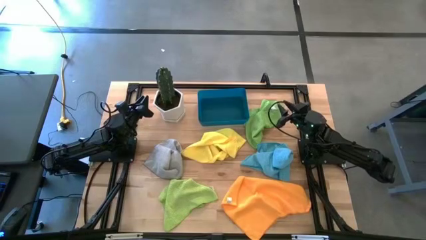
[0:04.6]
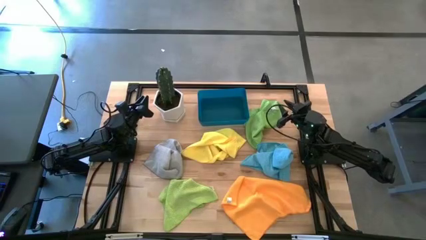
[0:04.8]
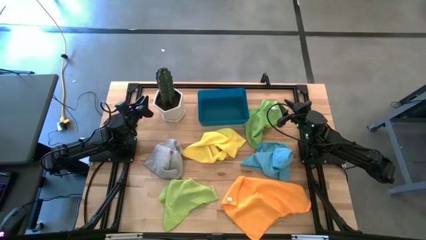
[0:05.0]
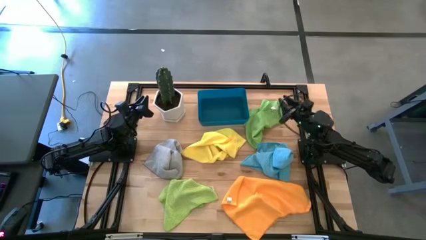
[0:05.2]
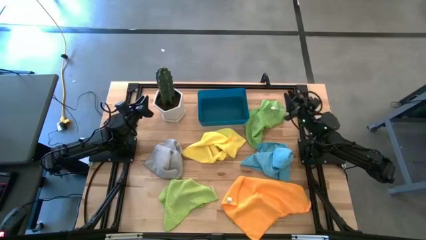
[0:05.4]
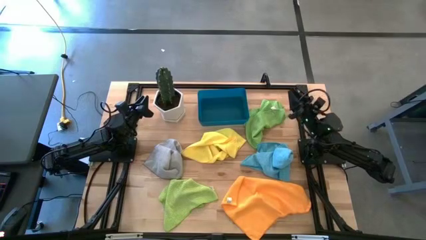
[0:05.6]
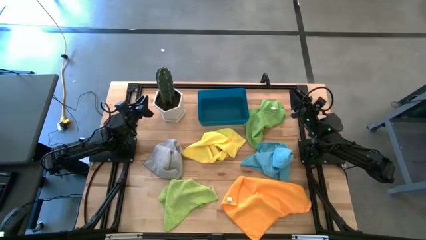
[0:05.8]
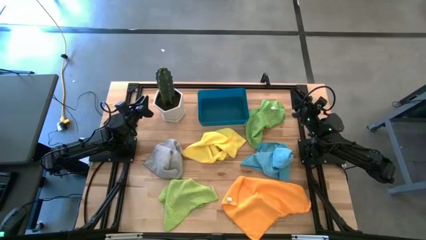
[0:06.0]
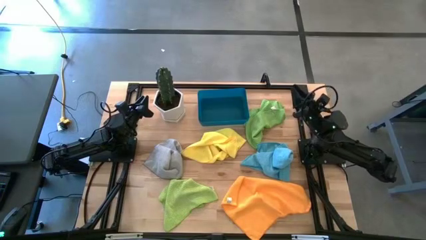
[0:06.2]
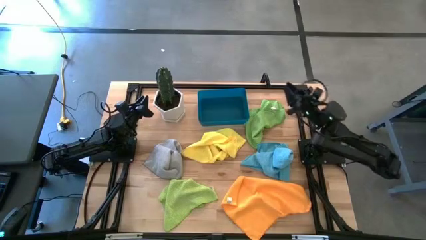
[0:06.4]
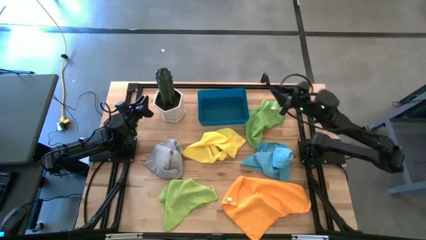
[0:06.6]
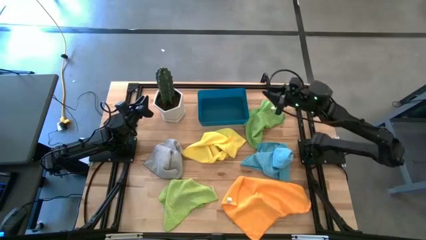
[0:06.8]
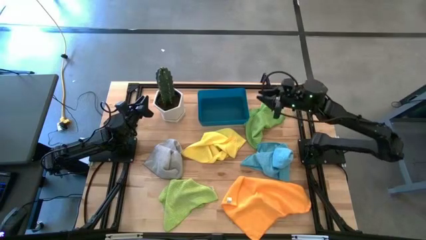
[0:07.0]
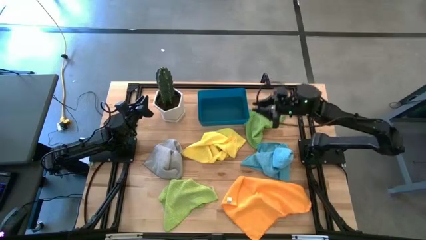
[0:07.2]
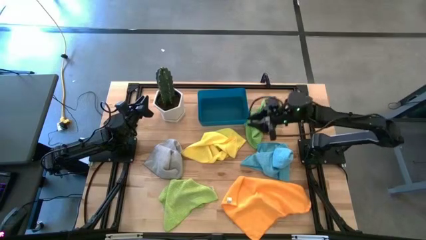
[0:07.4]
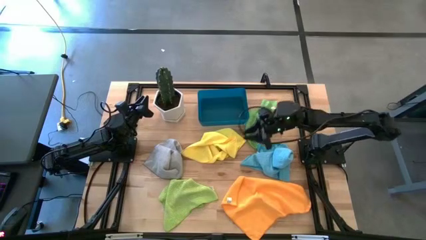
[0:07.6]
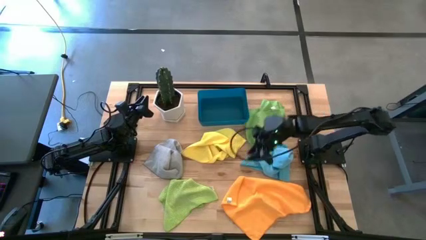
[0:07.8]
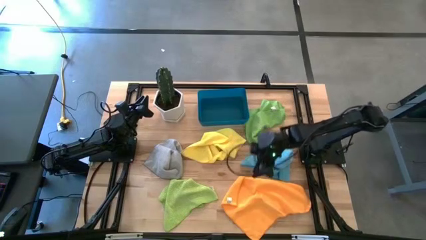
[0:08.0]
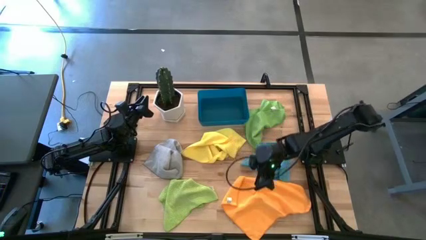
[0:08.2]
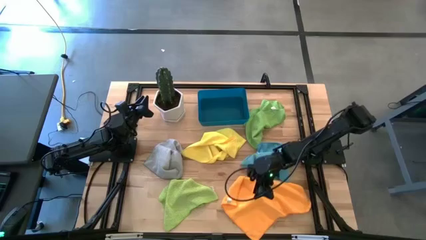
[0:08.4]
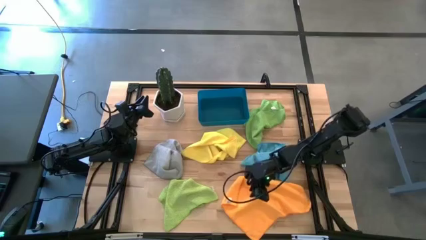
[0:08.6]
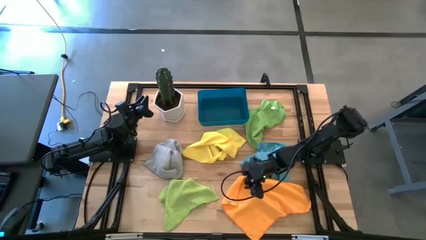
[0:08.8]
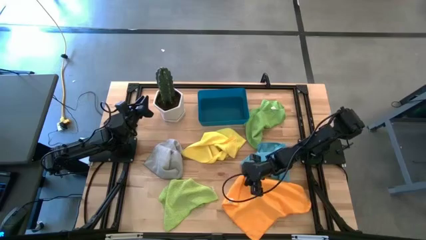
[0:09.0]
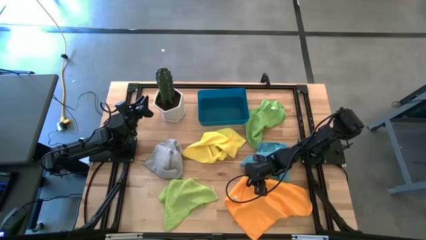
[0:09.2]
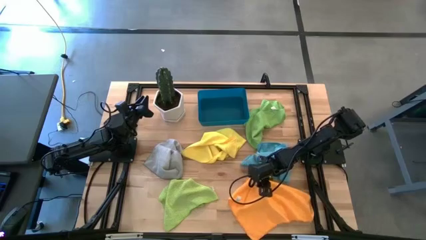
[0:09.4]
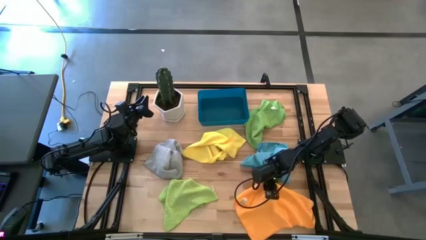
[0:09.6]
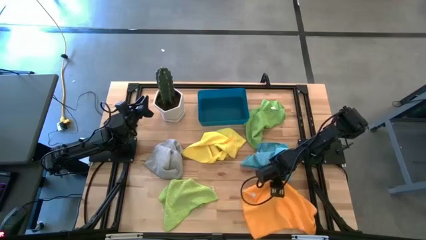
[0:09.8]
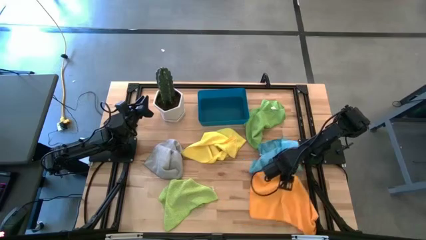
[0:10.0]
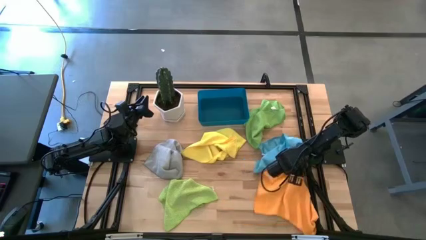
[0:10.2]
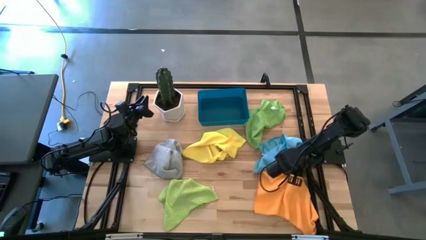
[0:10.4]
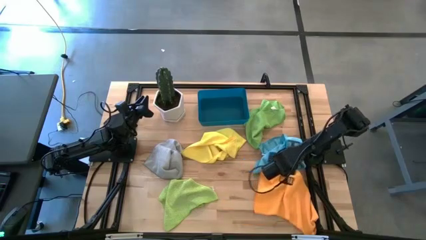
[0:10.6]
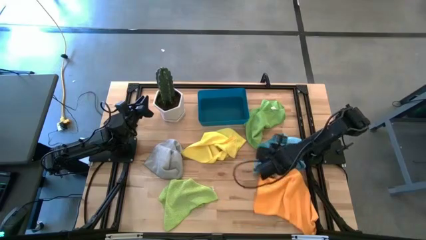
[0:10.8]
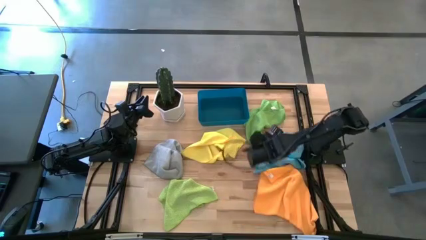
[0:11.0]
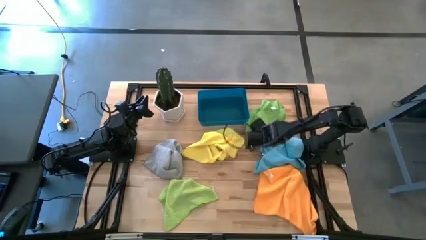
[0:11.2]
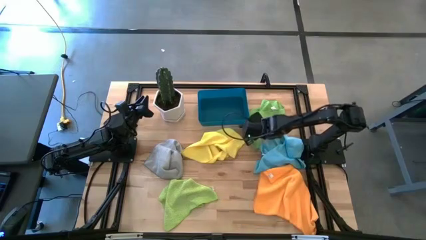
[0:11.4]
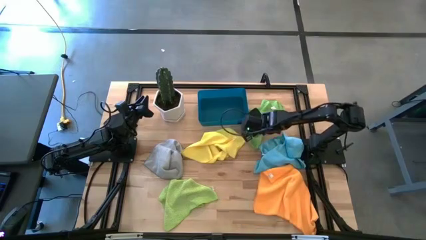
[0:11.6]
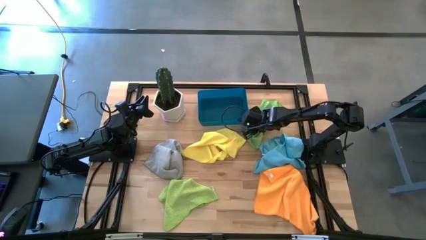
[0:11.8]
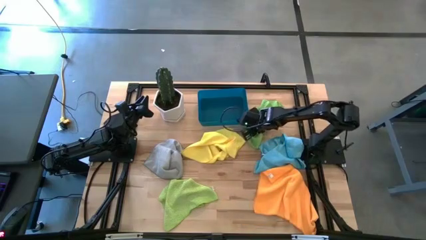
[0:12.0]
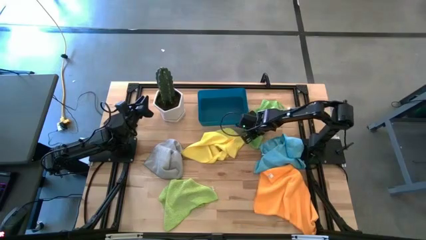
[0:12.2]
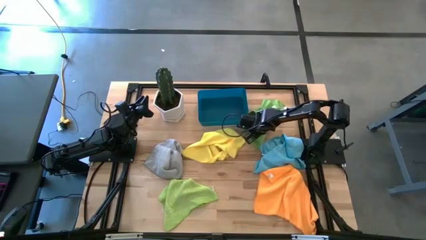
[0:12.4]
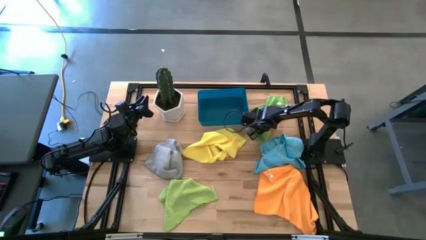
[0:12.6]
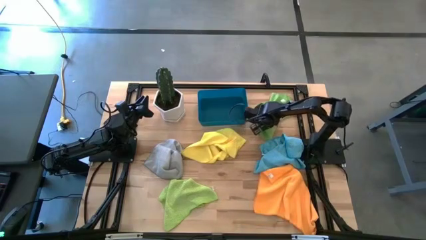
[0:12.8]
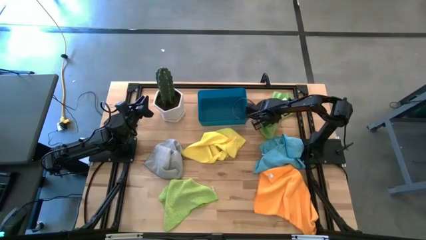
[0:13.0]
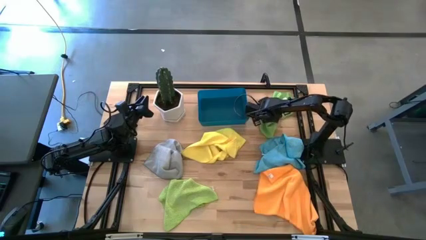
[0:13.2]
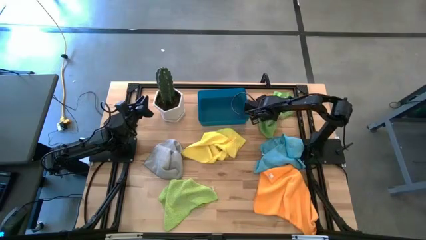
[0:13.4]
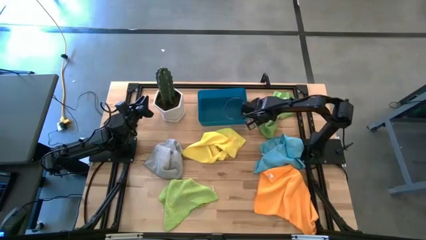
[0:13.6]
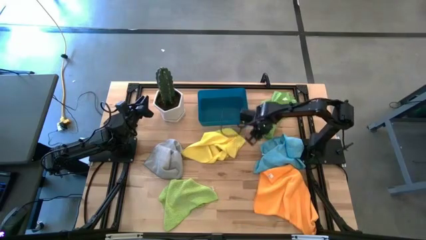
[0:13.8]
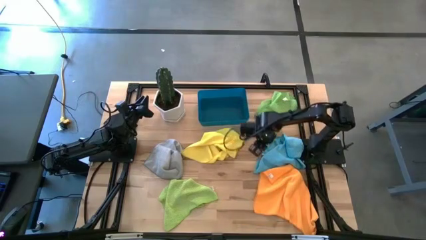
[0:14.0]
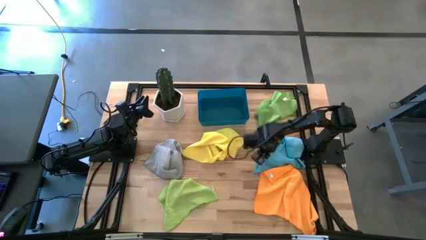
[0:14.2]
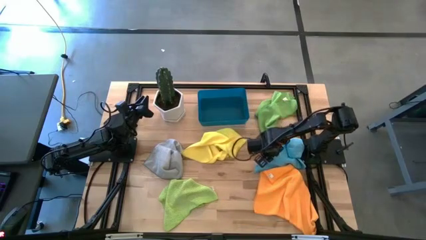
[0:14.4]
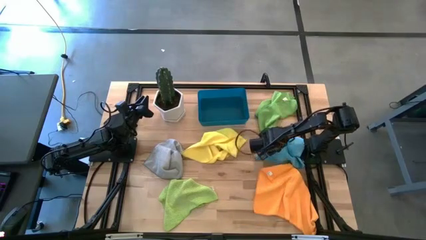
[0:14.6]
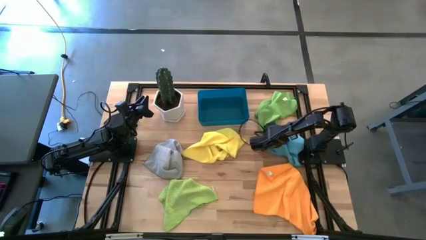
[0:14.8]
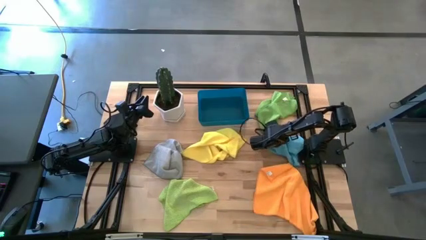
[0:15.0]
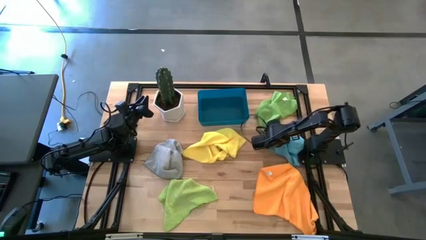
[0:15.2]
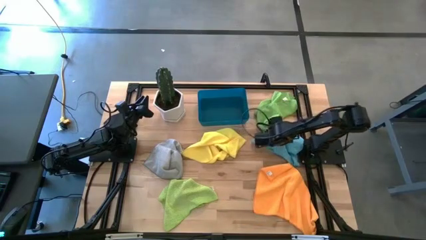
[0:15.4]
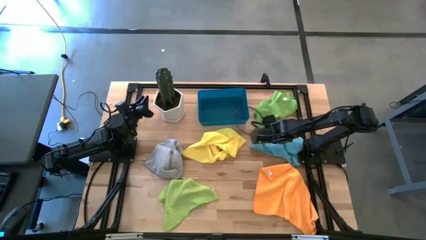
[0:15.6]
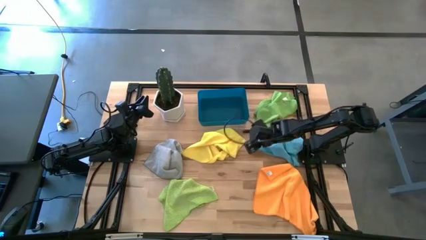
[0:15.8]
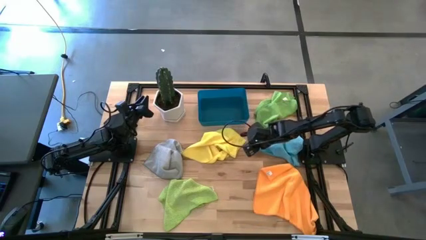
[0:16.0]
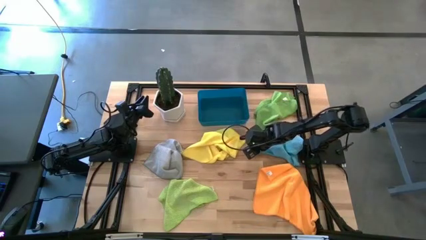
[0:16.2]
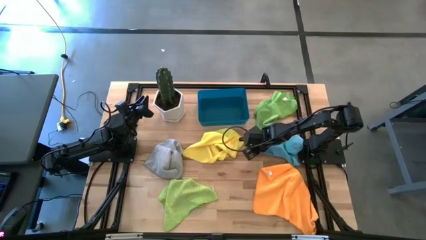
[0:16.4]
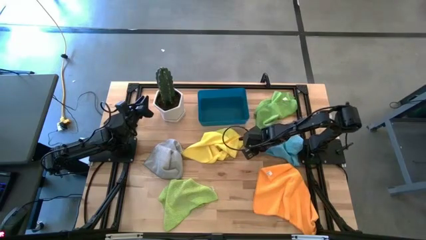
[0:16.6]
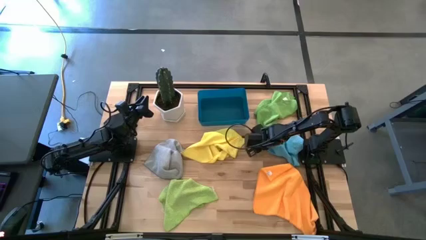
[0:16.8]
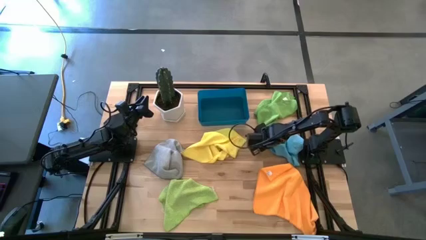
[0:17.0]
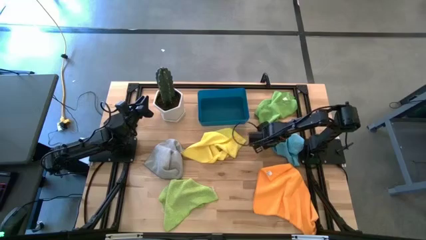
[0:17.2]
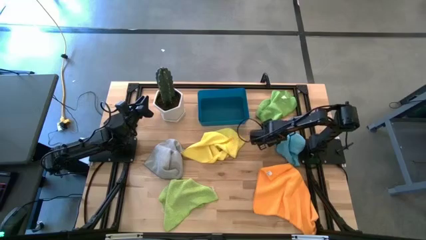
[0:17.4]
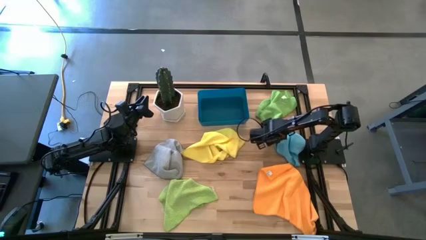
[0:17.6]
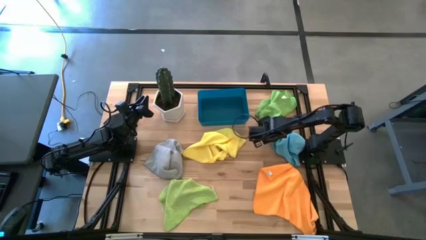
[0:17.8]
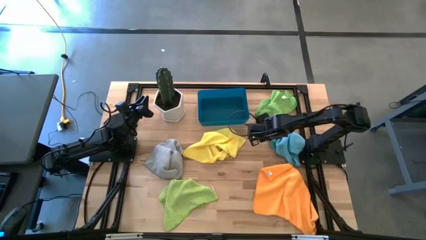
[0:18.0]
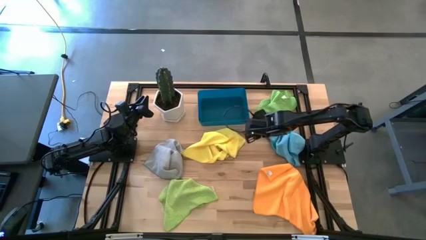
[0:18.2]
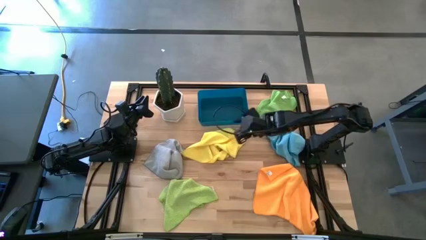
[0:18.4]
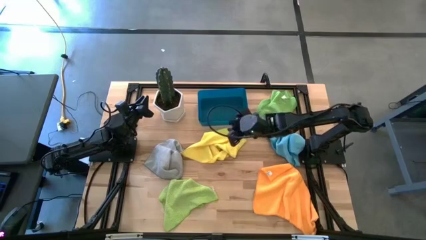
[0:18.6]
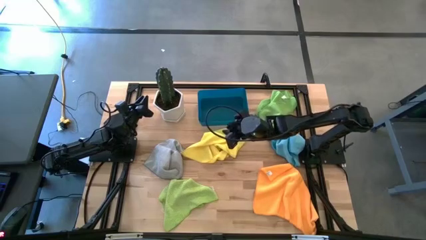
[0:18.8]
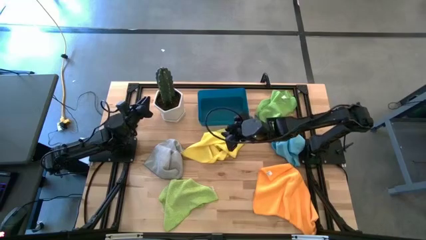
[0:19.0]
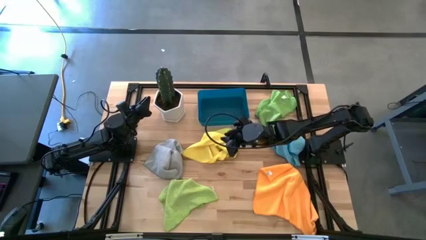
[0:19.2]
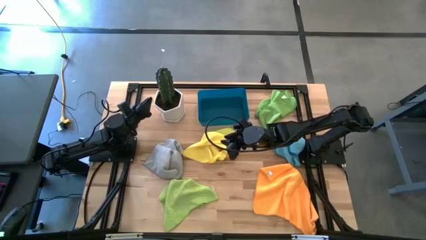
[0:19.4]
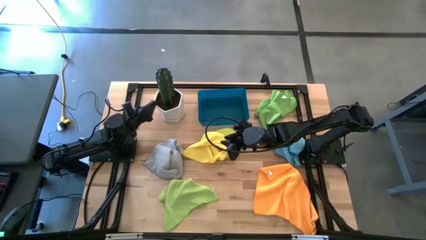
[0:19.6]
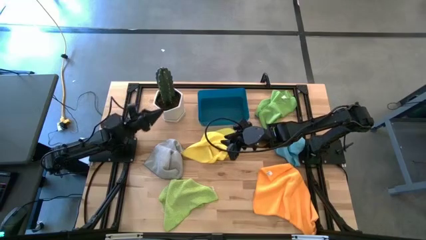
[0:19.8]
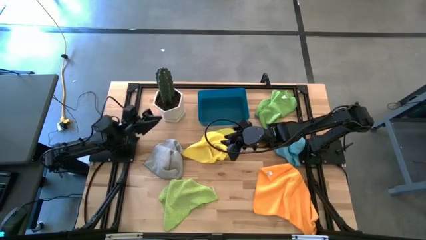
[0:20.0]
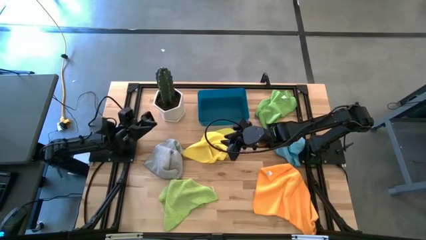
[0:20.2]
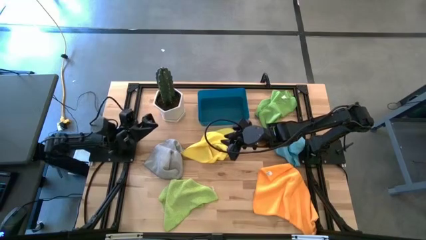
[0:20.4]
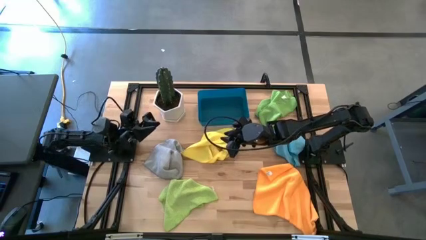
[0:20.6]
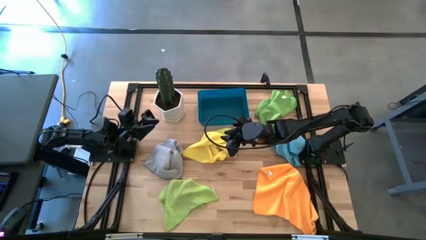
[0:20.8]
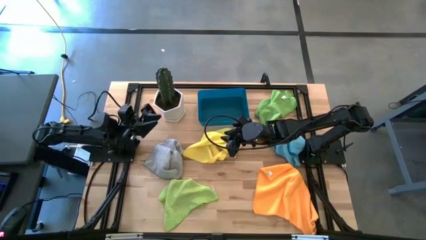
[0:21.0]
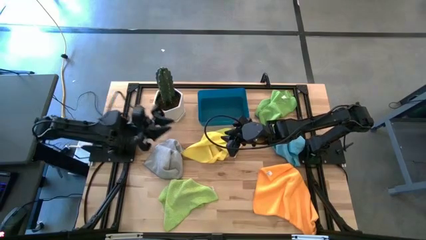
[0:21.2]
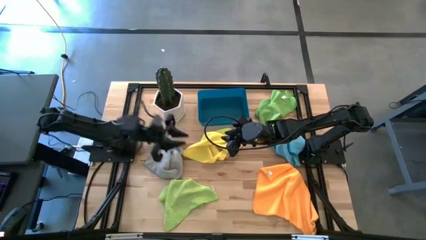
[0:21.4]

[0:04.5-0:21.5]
Task: Fold microfiber towels
Adjust the microfiber towels
